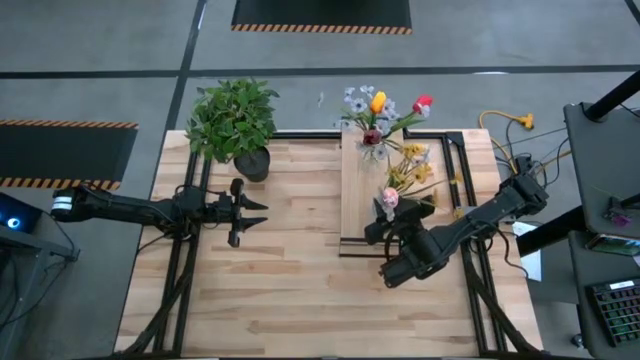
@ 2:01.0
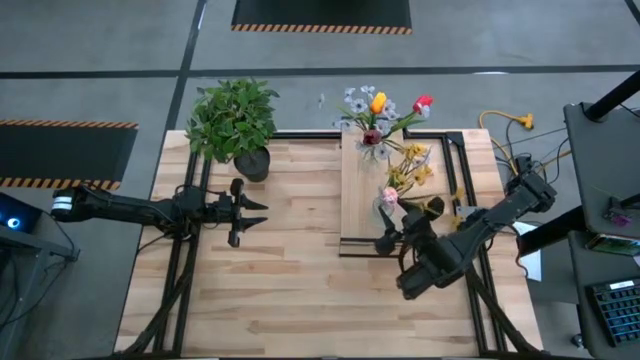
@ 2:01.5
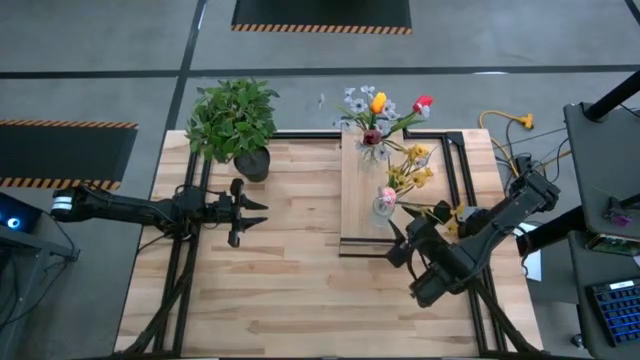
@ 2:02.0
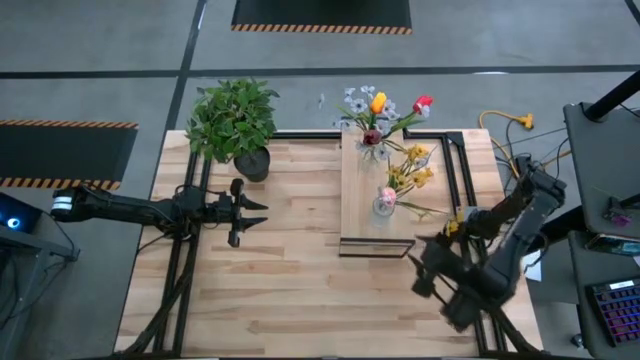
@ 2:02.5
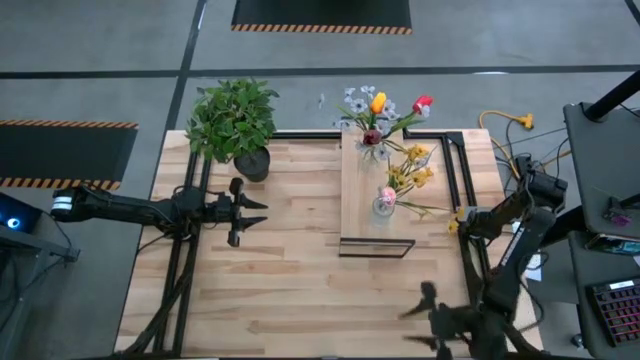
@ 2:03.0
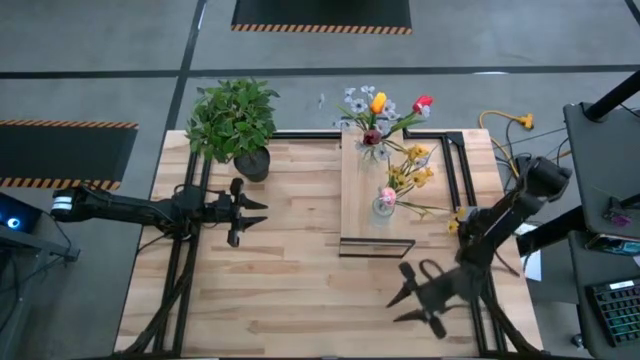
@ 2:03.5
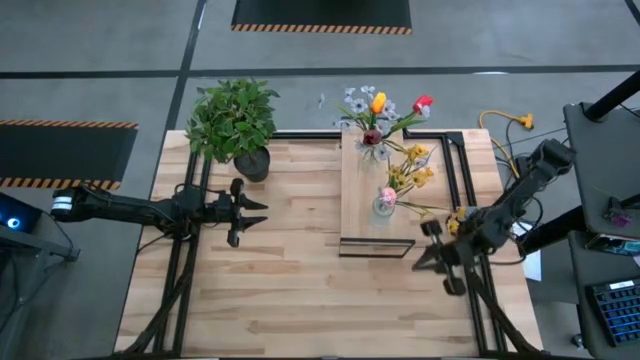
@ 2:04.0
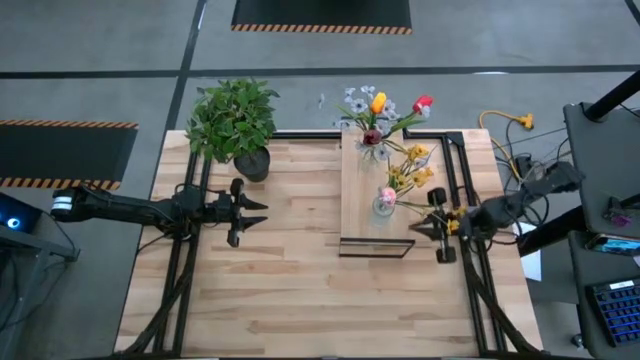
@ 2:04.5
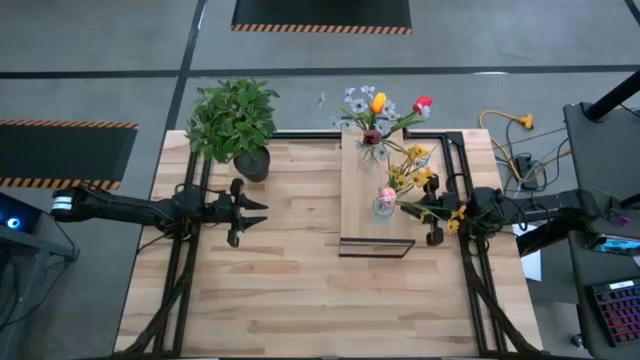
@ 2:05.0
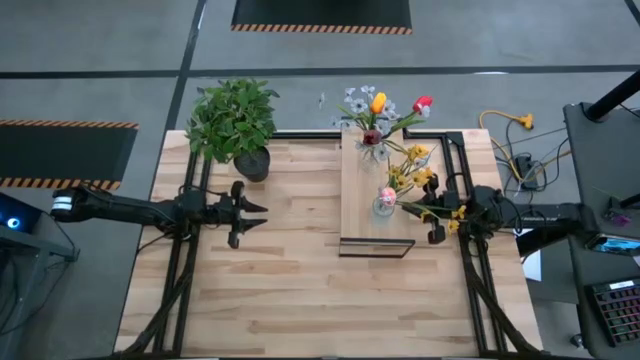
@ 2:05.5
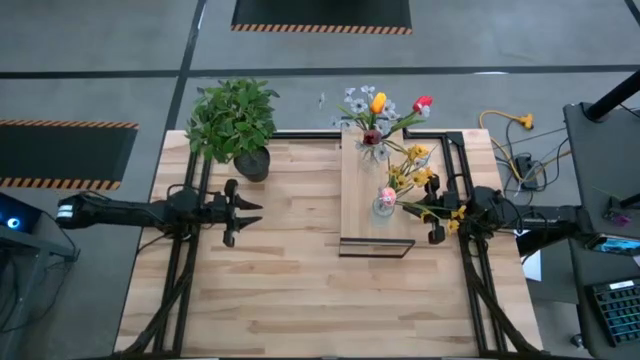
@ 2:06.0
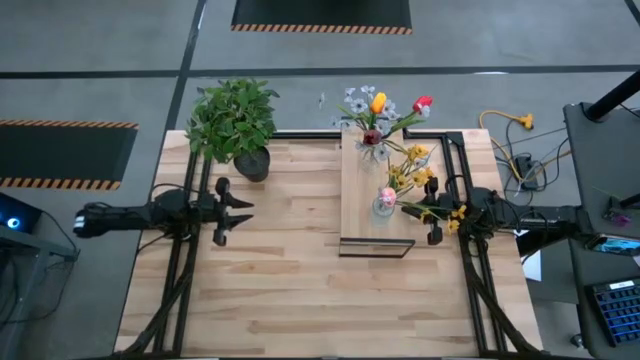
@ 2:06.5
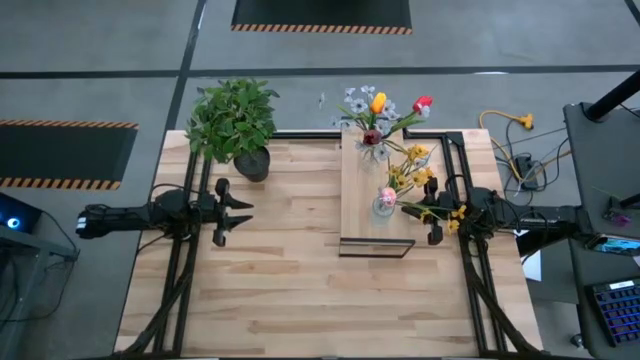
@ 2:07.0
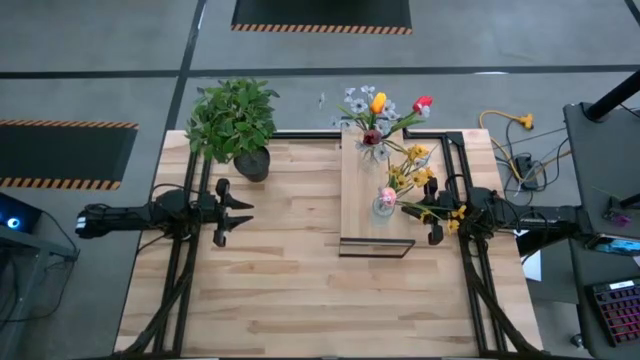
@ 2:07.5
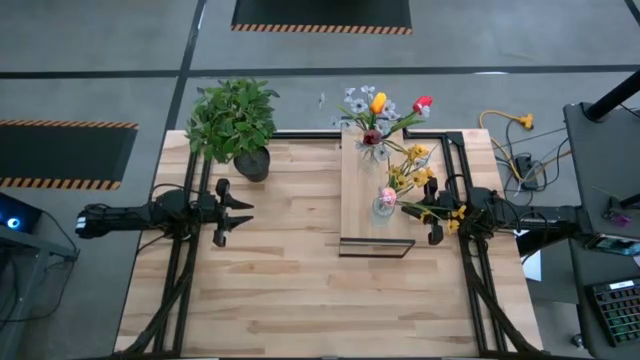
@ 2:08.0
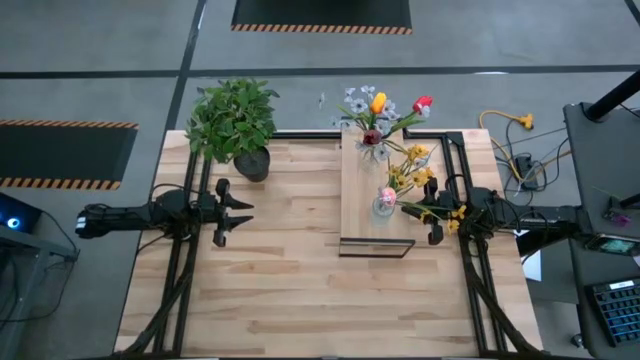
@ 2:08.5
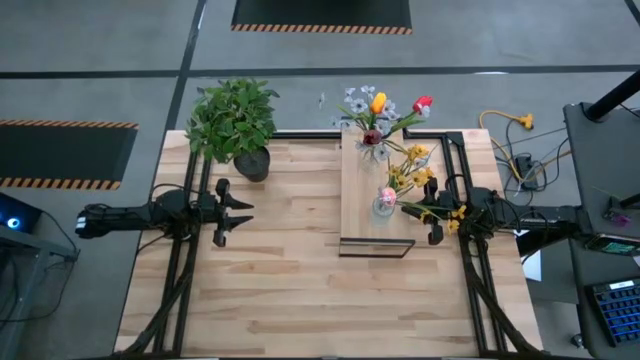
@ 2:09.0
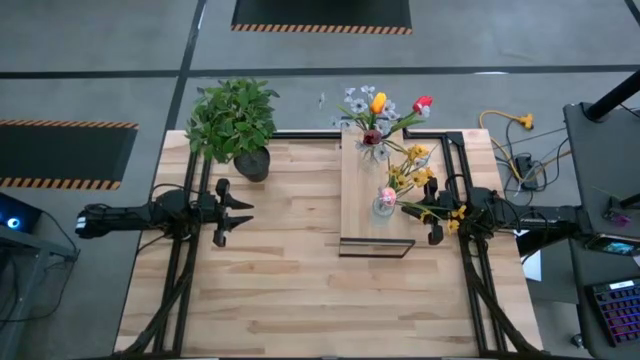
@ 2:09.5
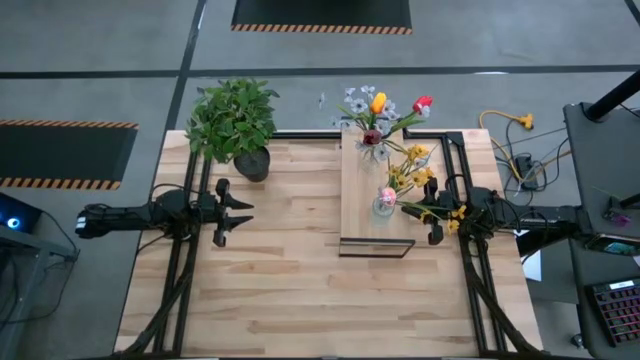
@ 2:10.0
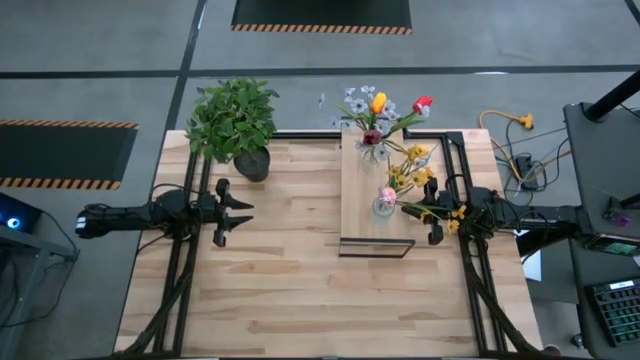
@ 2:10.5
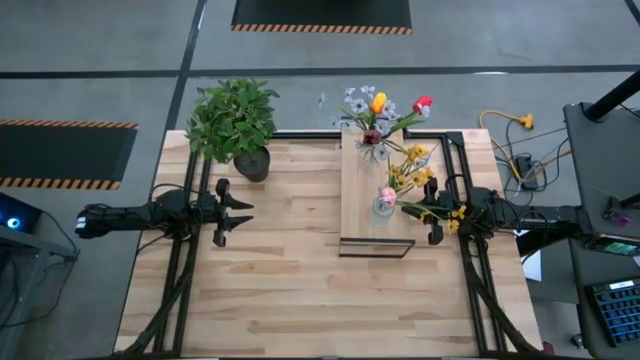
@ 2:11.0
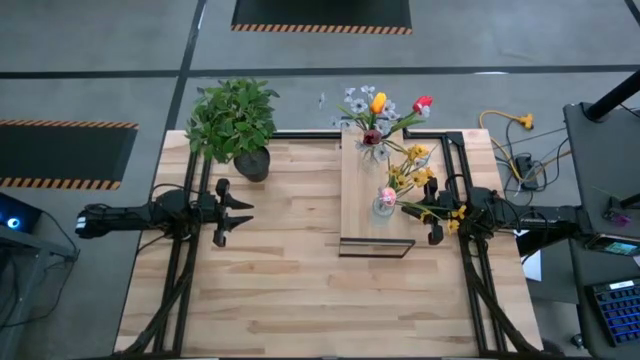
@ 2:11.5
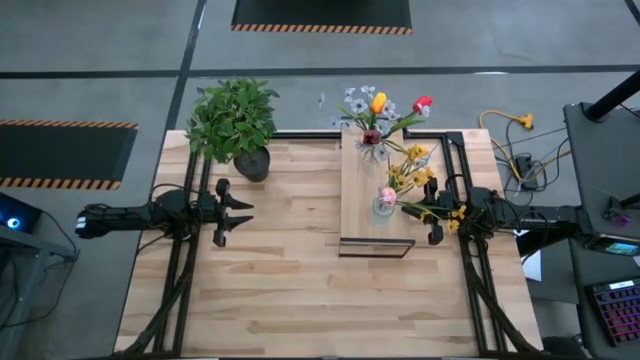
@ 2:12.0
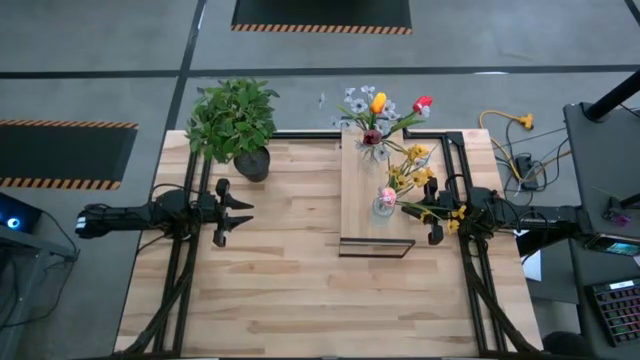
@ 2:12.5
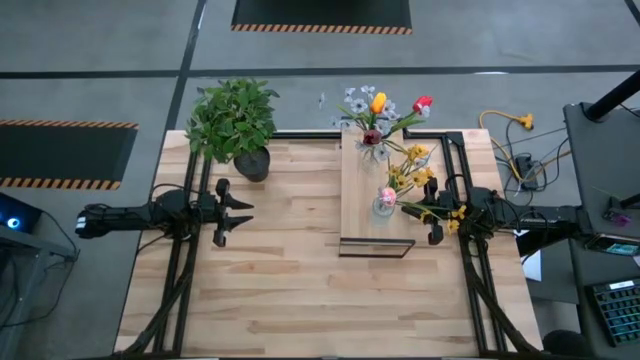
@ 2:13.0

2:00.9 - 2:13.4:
Task: Pick and place flowers into a vace then onto a shelf
Return to Home Position

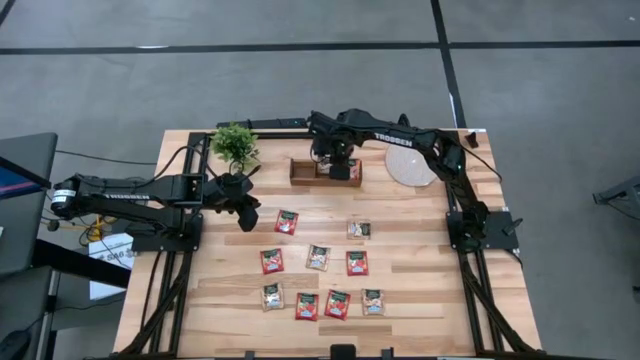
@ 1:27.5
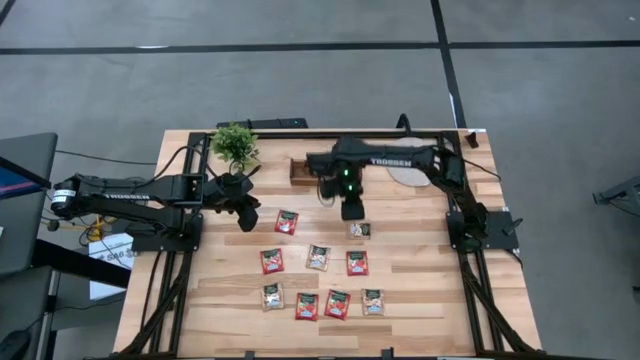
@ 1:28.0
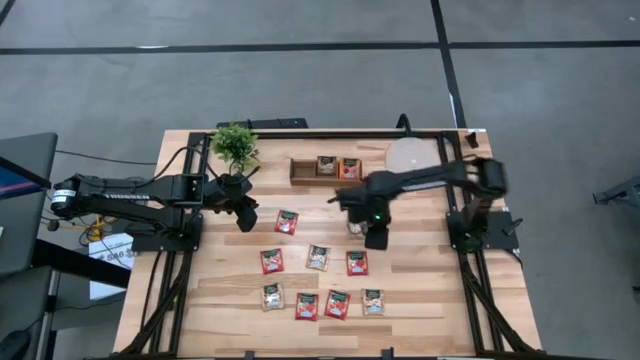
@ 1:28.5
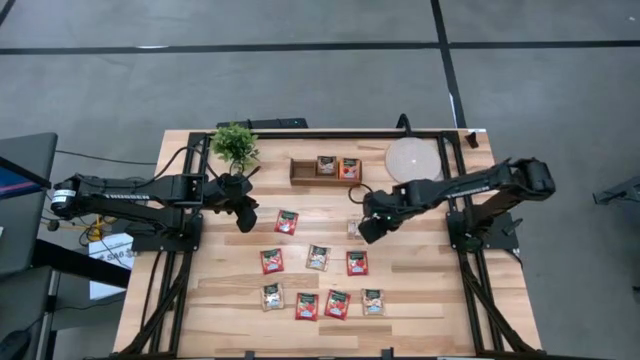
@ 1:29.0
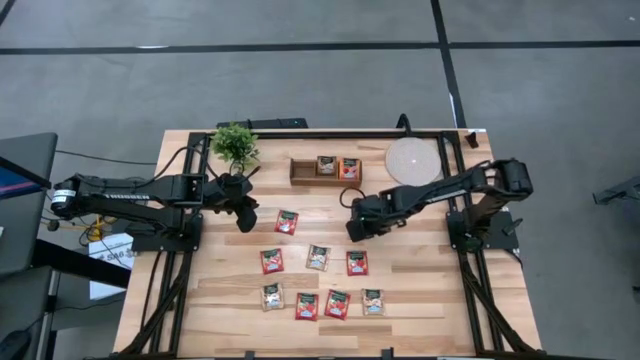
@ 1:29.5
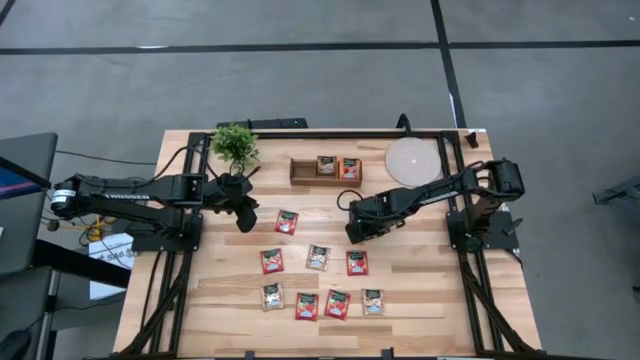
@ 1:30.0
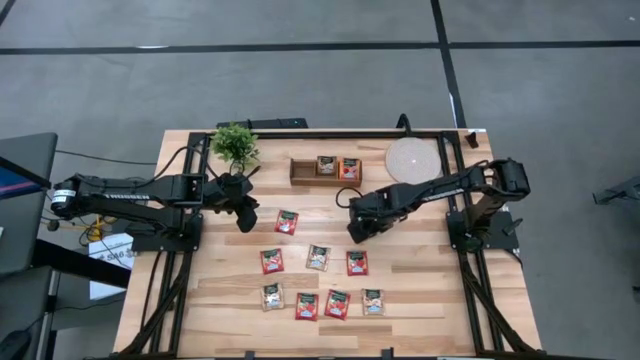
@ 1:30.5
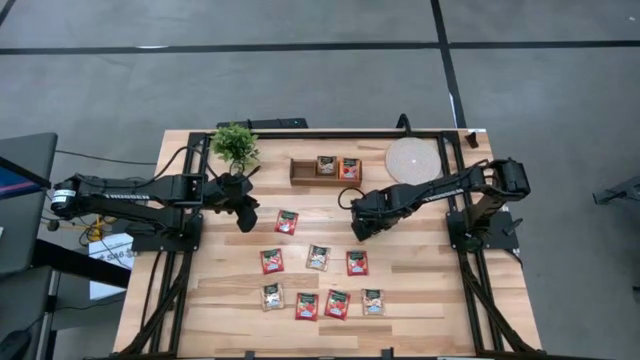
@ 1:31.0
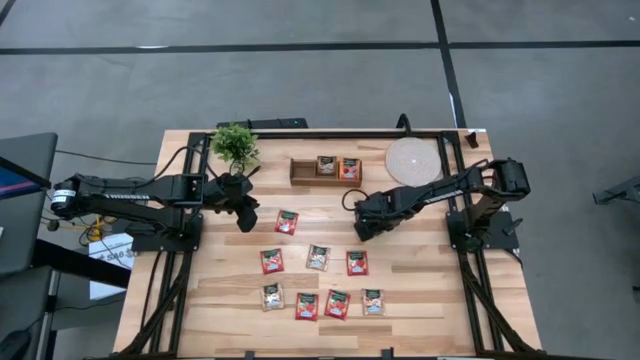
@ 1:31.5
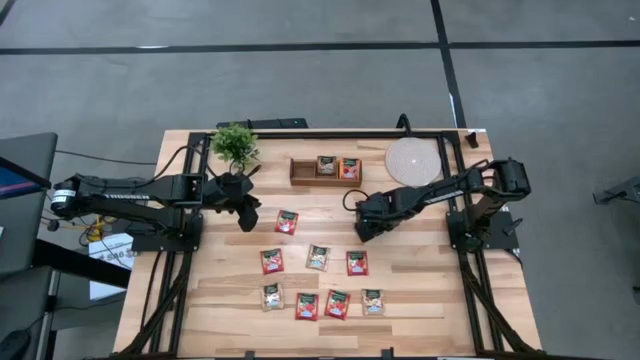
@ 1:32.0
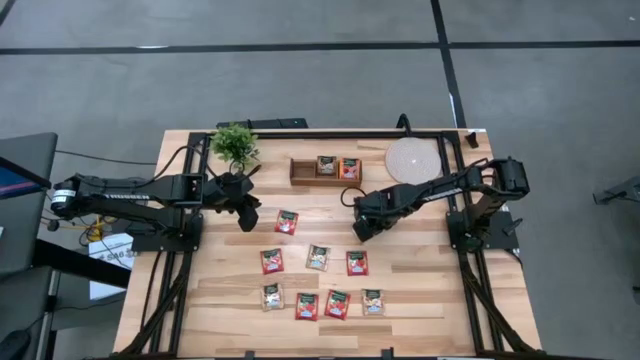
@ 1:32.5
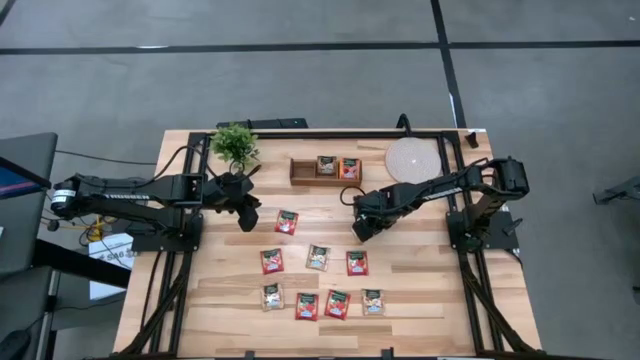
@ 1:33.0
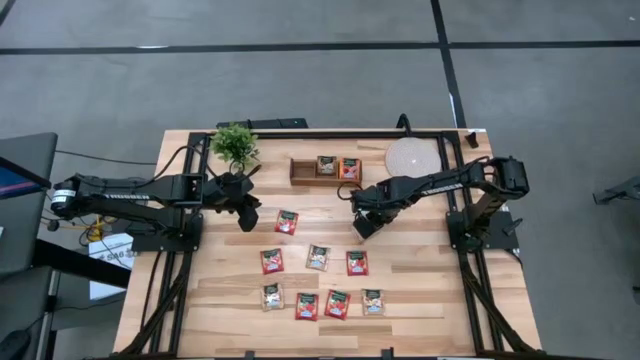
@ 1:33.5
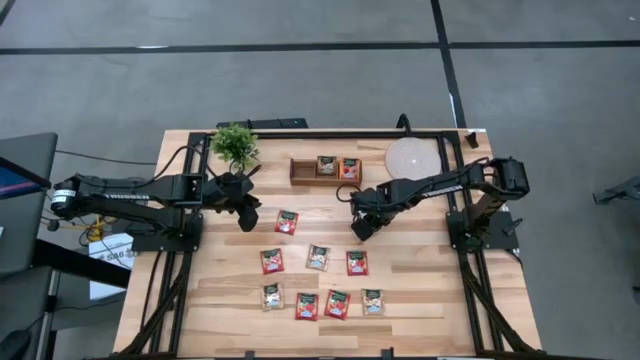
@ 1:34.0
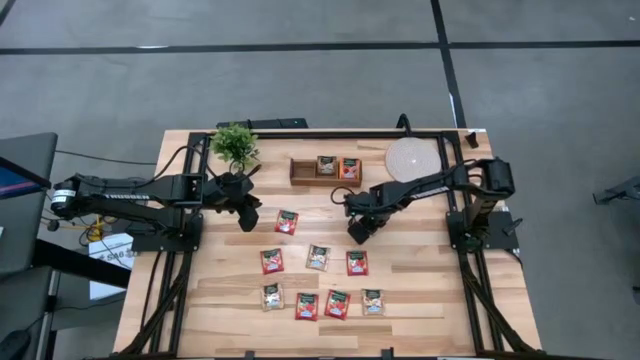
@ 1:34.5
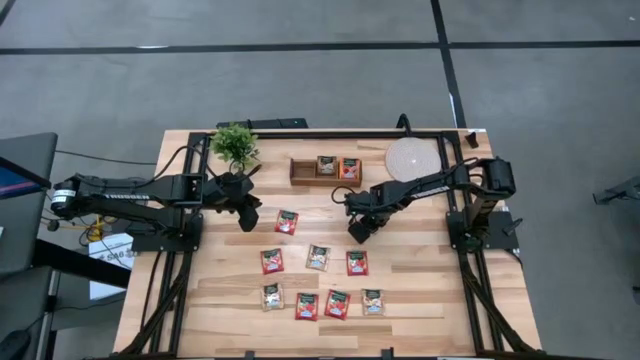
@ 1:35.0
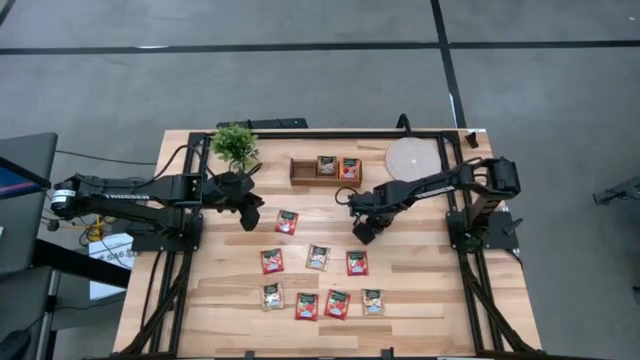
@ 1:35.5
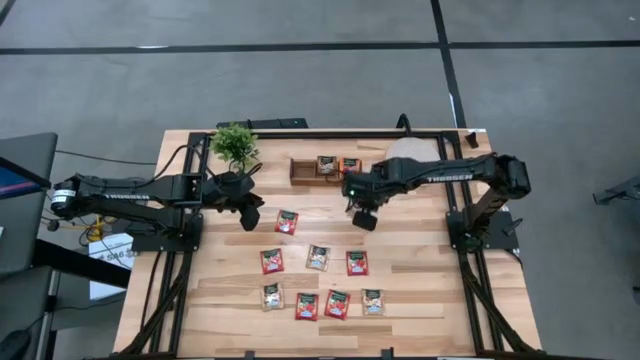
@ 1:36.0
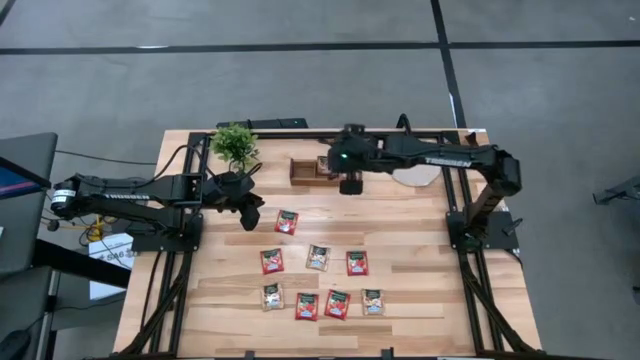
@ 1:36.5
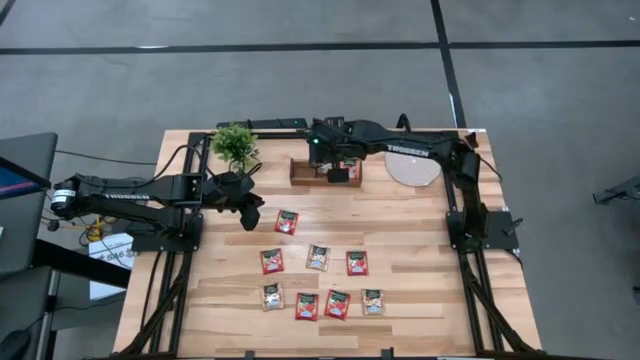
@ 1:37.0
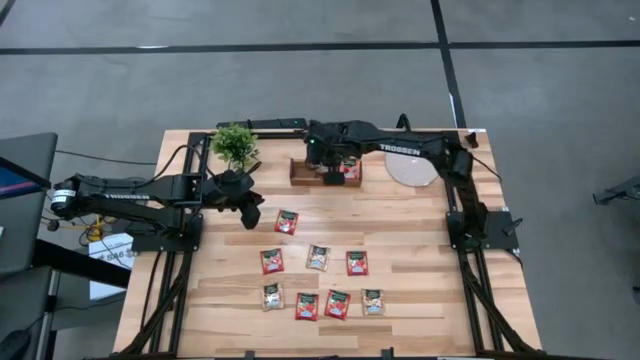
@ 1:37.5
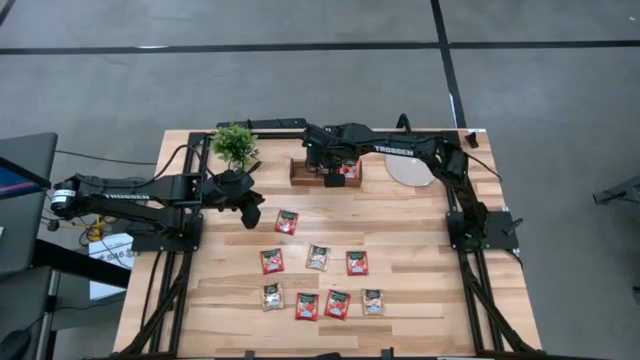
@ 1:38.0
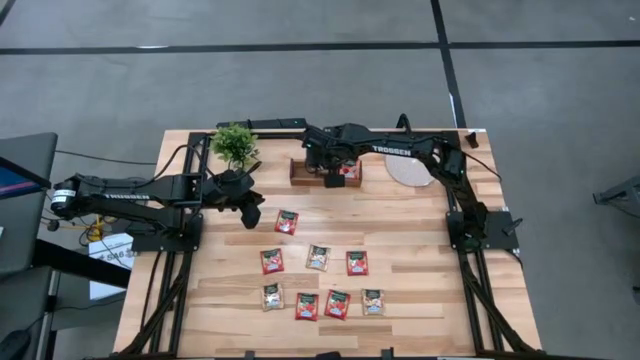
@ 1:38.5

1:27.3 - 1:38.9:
Task: Pick & Place Tea
Put the brown tea bag into the middle section of the wooden organizer
